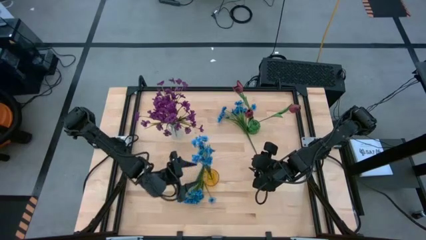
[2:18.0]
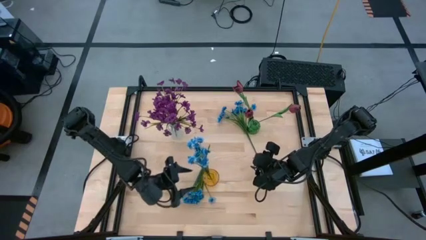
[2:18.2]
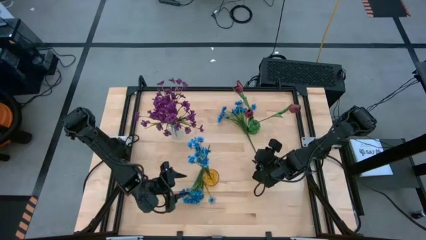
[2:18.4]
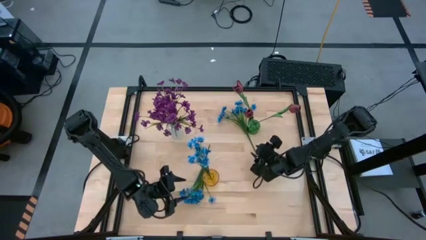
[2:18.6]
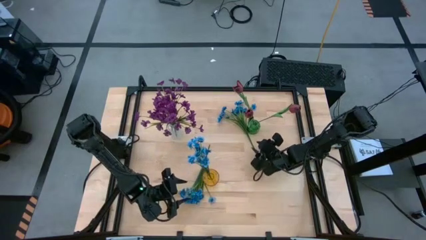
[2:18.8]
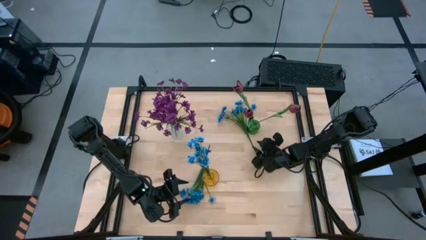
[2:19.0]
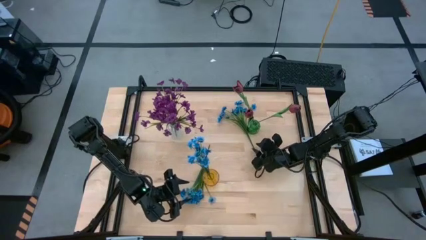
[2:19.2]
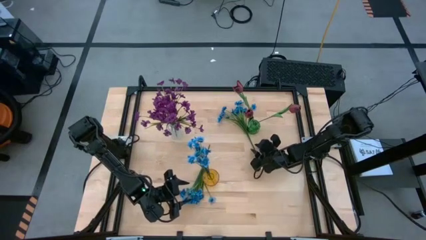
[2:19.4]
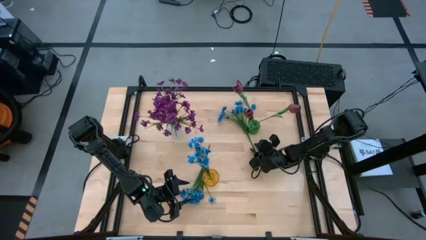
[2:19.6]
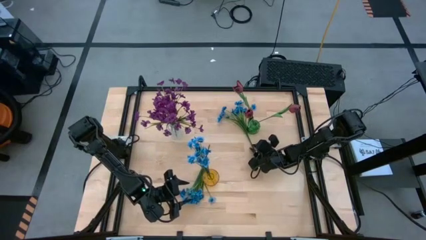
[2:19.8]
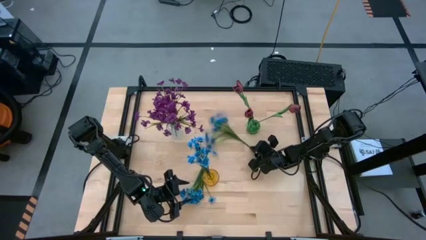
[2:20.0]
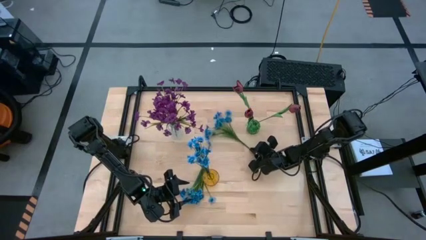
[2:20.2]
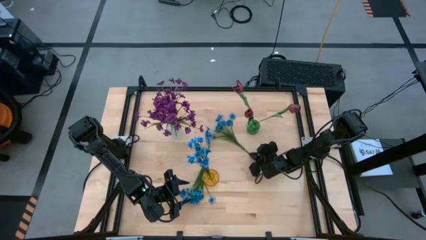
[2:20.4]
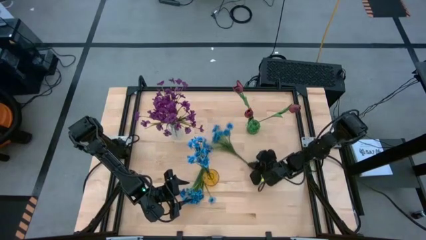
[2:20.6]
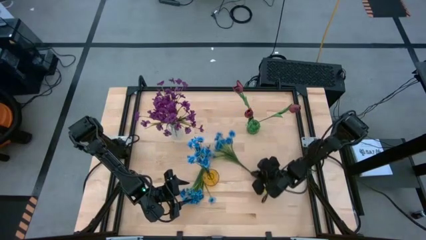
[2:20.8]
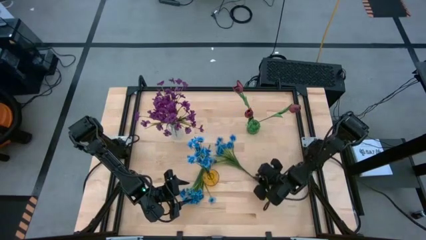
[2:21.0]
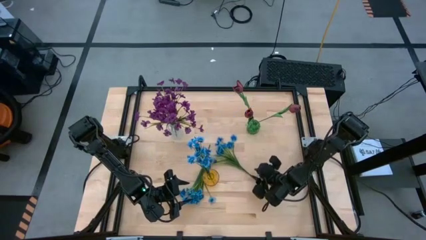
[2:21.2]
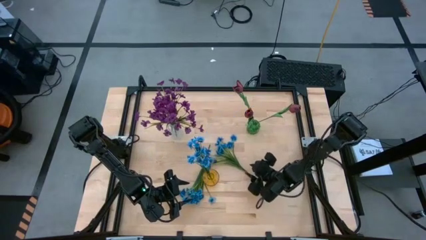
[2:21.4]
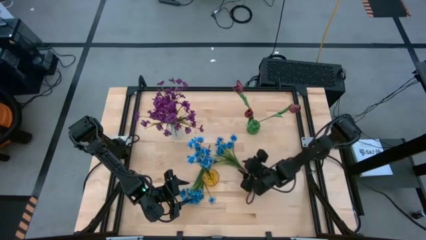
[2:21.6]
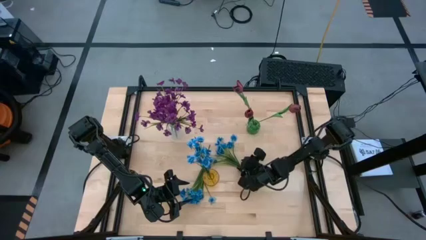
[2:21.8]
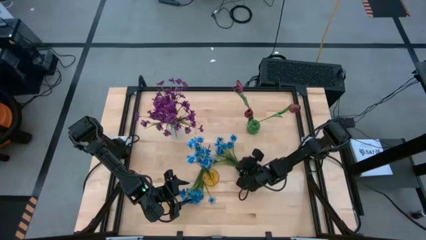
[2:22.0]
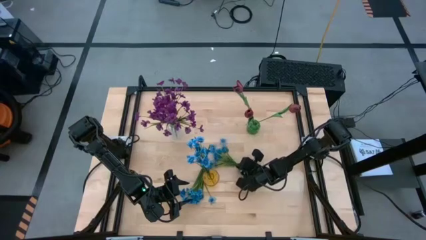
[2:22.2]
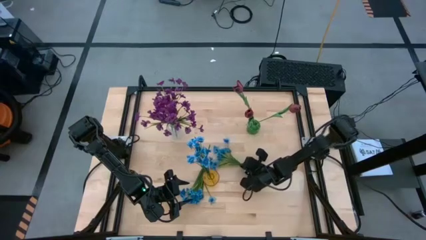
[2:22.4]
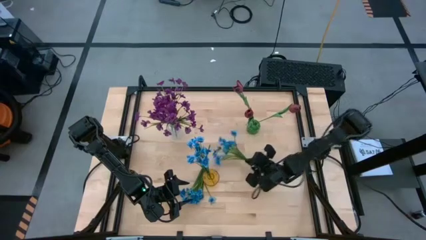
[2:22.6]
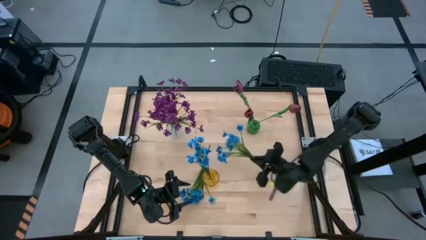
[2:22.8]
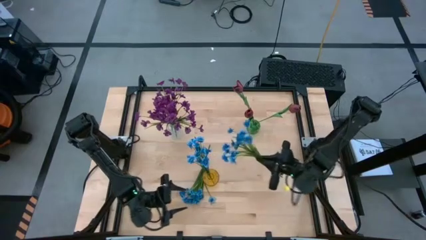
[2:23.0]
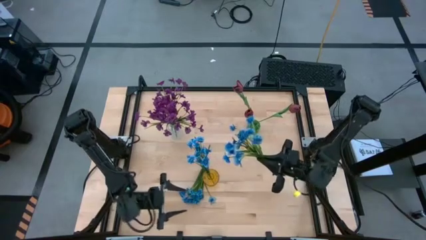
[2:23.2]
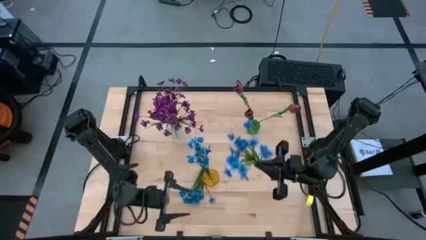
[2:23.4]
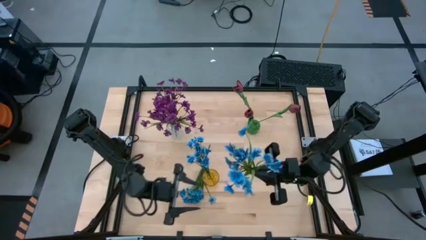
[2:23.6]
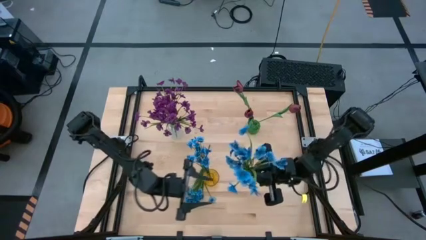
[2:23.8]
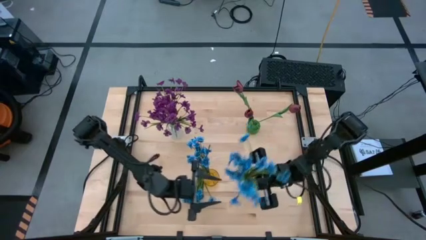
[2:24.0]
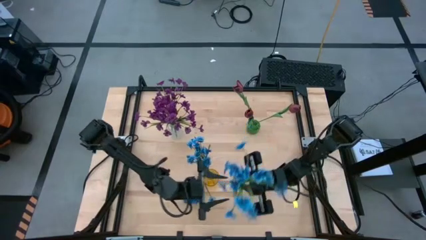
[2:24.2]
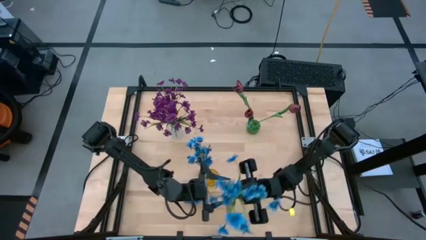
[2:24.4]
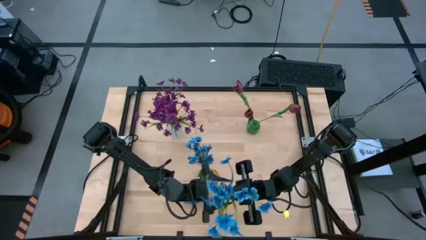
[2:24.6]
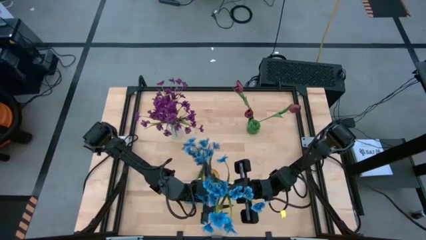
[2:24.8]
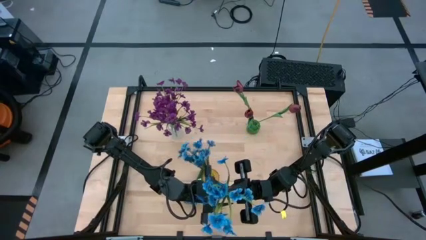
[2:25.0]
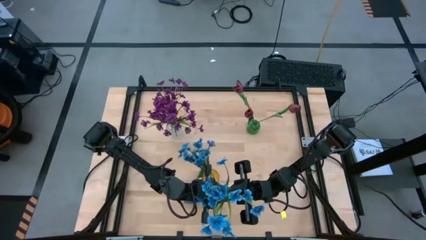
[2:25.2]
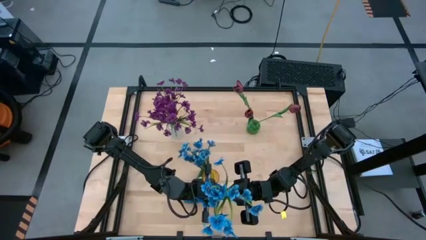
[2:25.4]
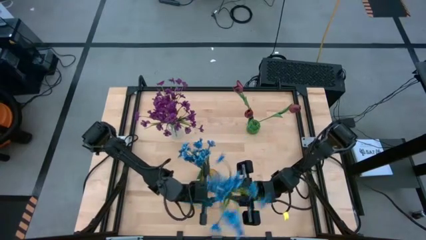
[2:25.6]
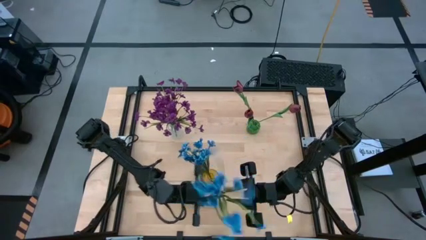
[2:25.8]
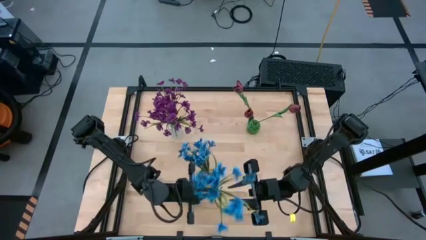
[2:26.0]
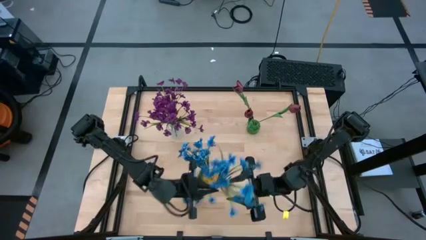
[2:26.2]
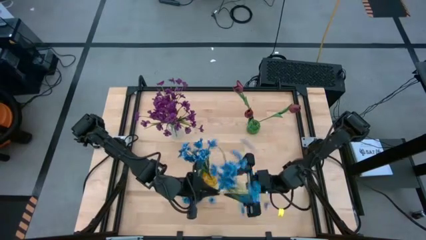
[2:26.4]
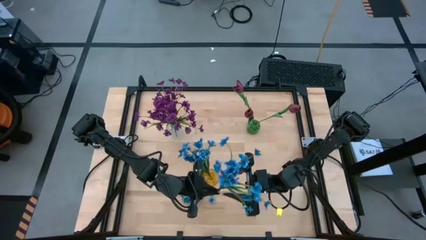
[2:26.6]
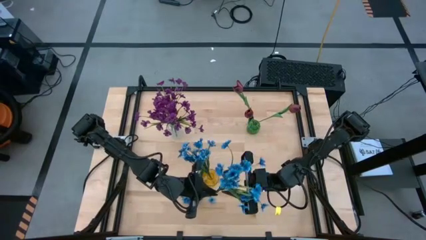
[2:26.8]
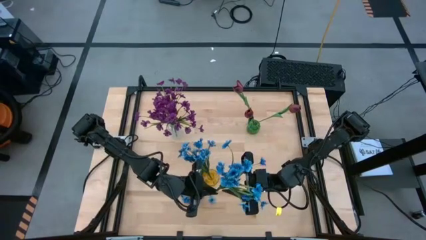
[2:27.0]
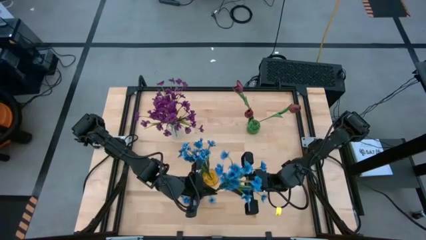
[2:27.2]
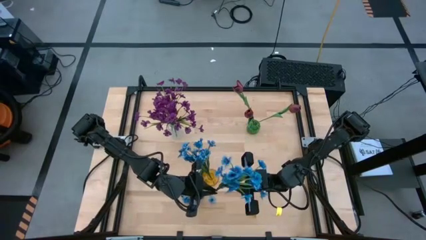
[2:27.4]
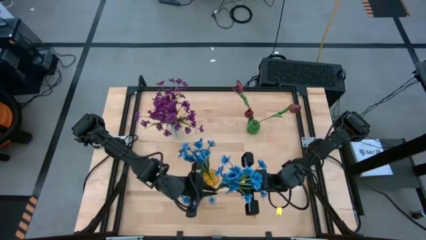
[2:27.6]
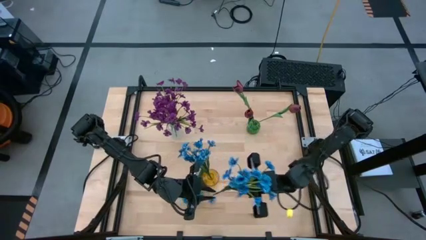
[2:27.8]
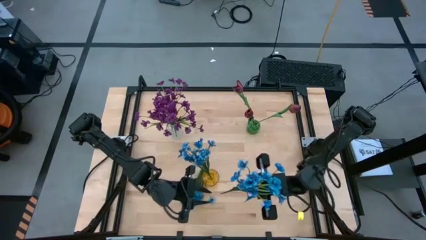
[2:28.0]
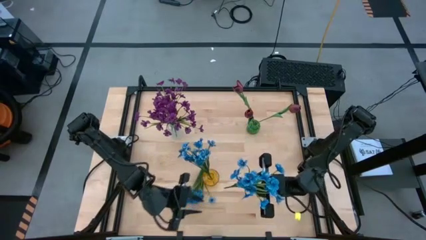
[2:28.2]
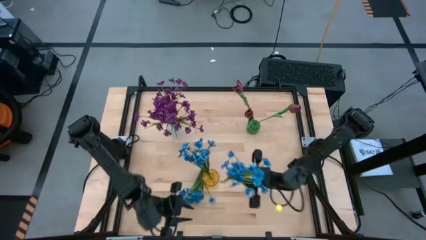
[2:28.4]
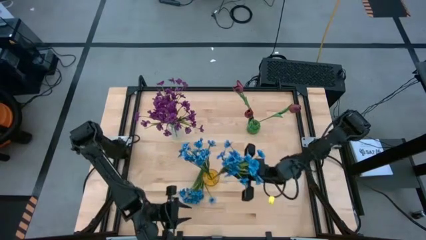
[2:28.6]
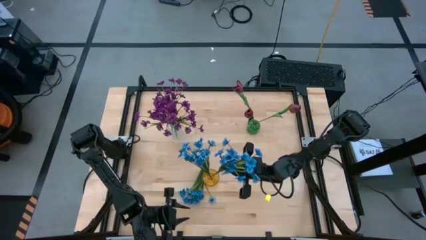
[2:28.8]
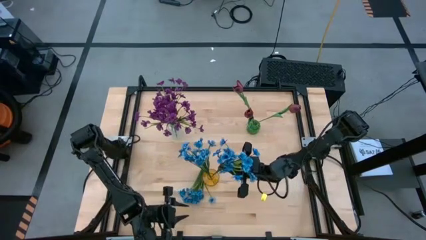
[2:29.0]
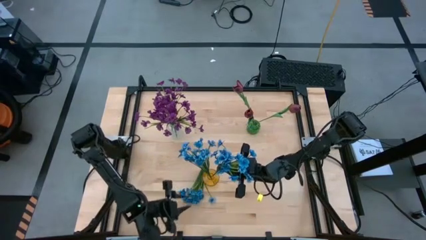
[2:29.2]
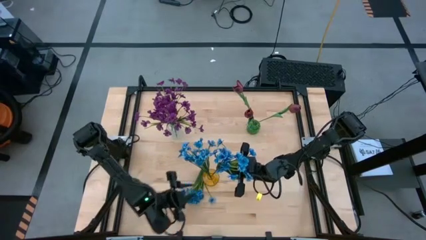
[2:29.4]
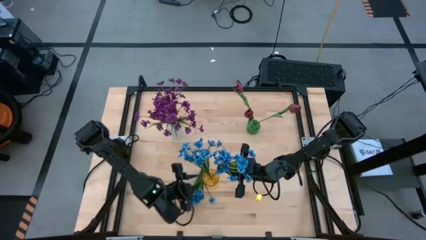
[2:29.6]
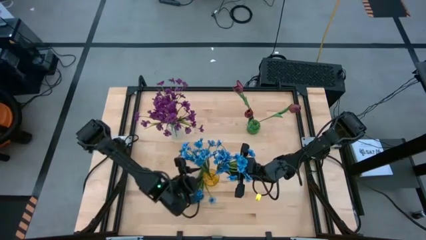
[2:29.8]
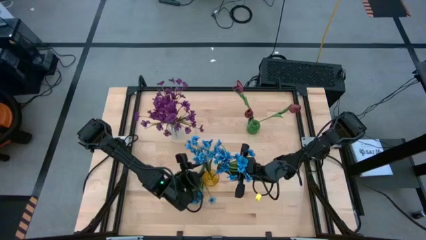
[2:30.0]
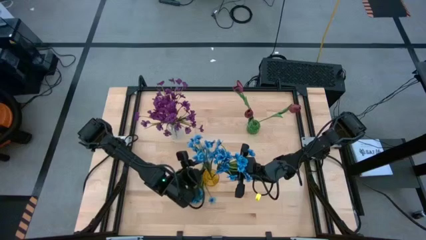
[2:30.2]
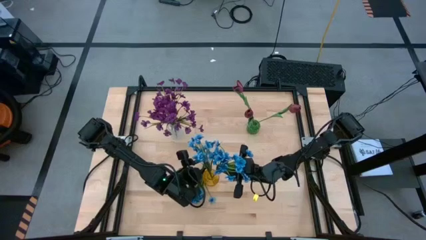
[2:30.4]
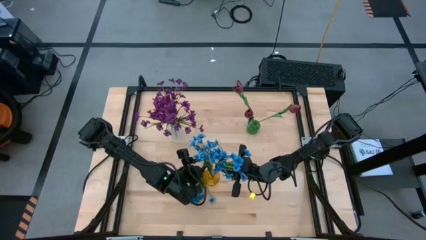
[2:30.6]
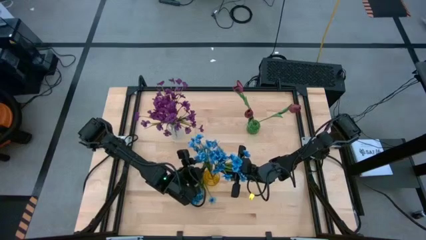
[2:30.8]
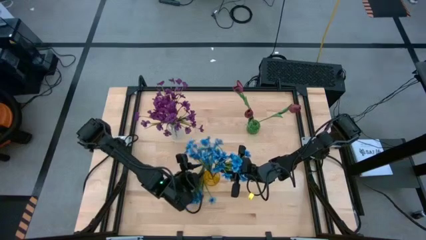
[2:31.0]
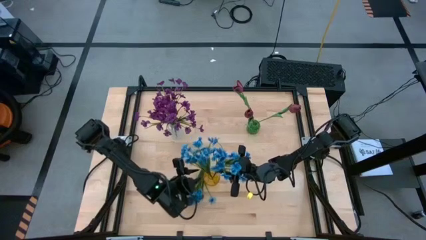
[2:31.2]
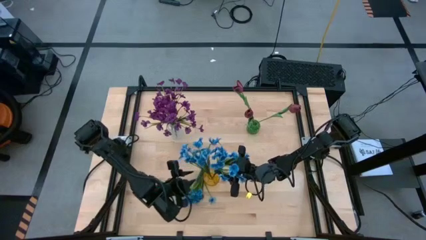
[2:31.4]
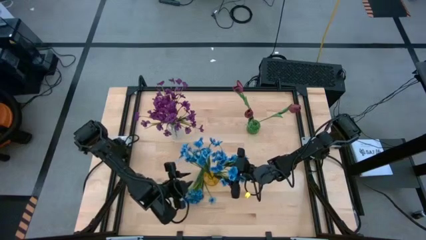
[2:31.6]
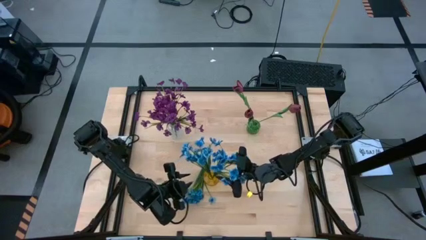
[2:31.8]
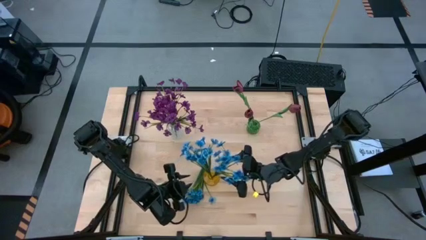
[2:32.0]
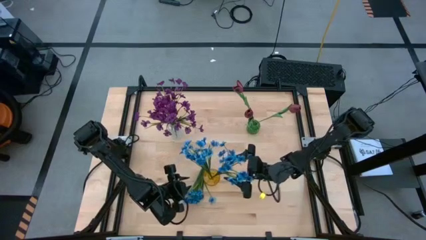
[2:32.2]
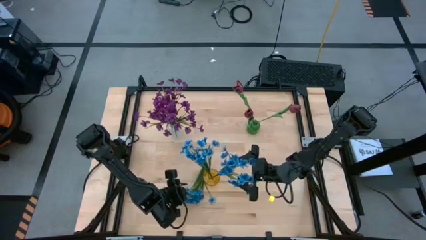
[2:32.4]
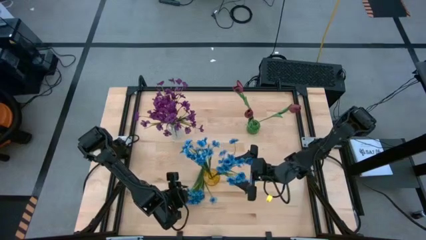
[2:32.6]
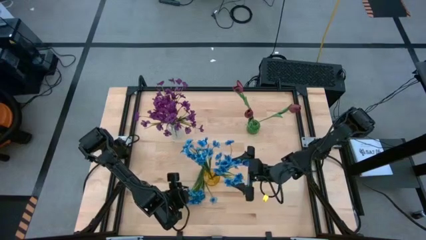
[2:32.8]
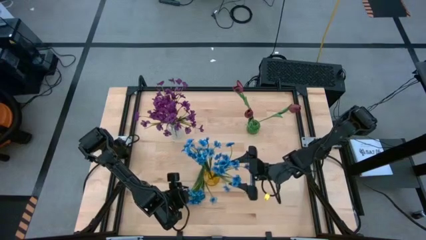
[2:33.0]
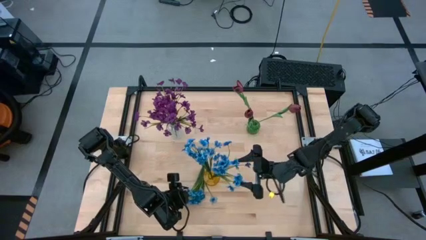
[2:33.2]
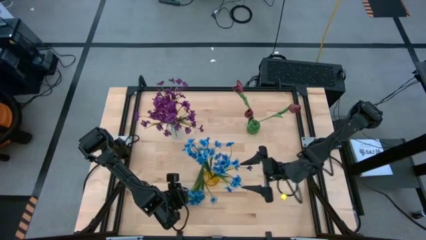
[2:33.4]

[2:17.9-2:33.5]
Task: Sort flowers into vase by color
Put the top blue flowers into the yellow vase

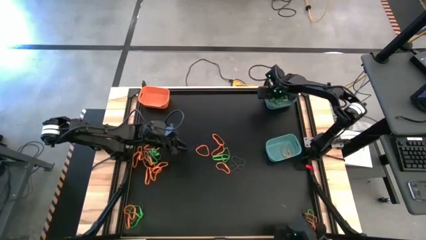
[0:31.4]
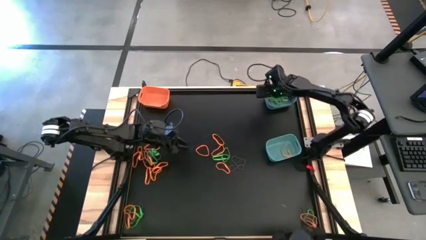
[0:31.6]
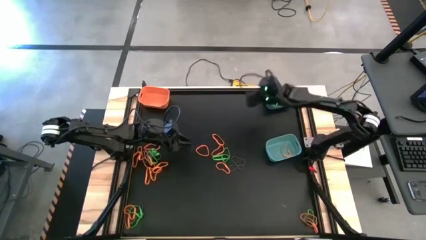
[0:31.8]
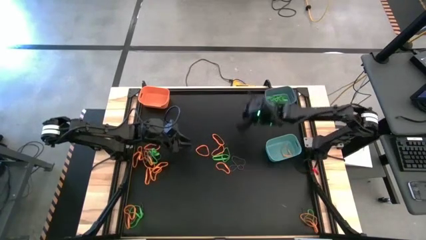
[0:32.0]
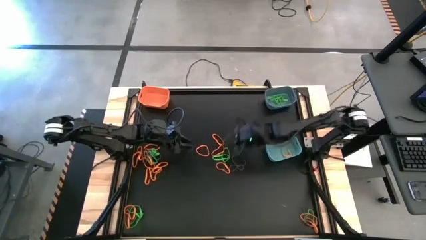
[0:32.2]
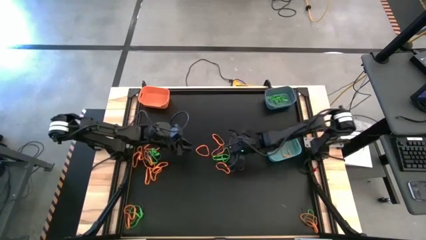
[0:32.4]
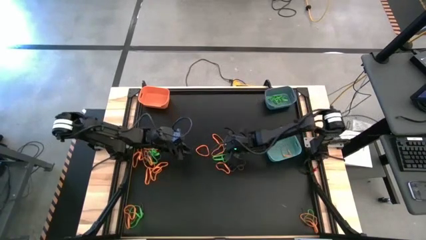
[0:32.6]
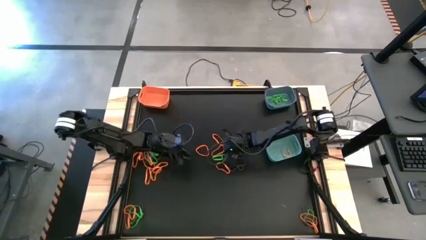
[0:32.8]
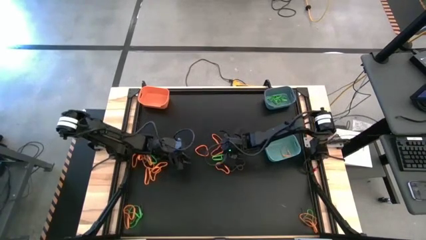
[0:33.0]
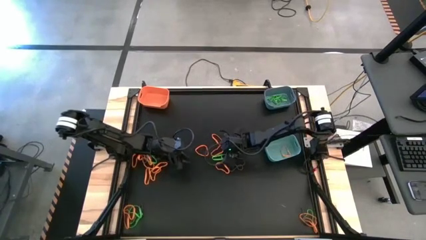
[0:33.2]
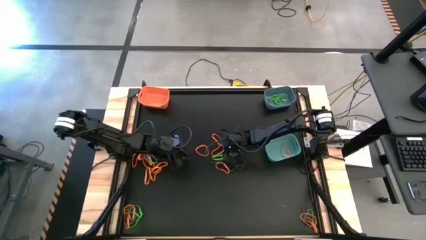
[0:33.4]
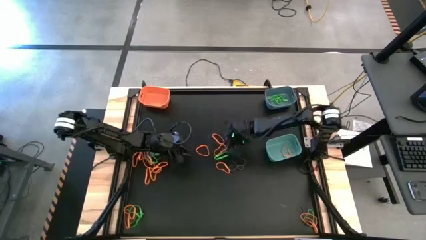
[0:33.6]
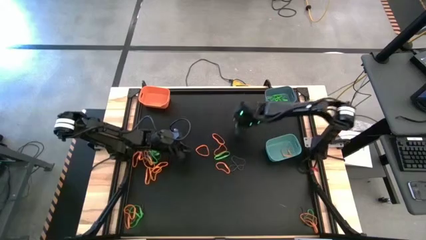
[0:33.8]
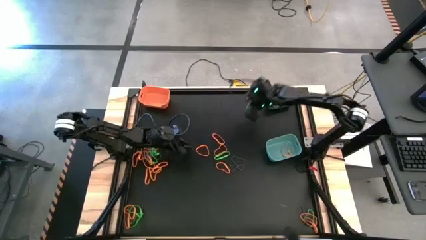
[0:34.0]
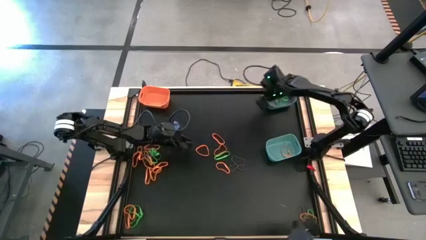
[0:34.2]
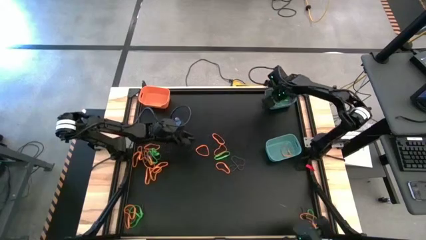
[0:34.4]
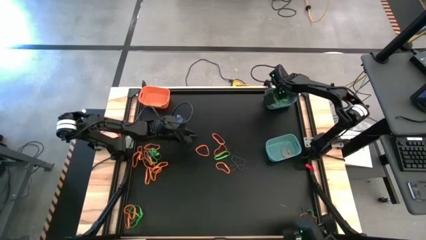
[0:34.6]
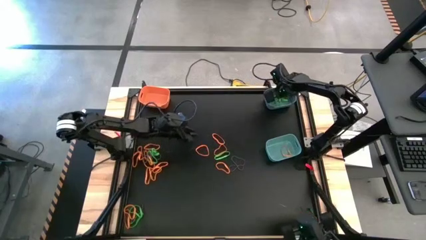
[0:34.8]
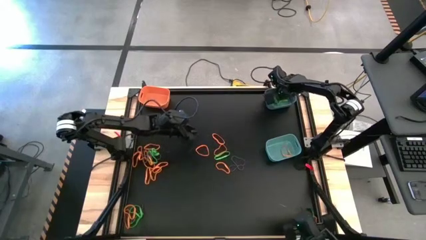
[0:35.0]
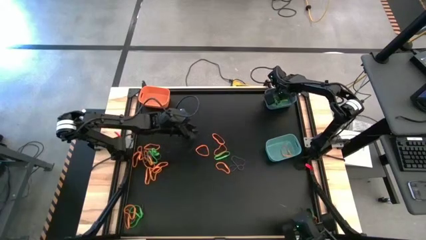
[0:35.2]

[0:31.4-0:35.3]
Task: Sort rubber bands into baskets
Put the green rubber band into the blue bin
